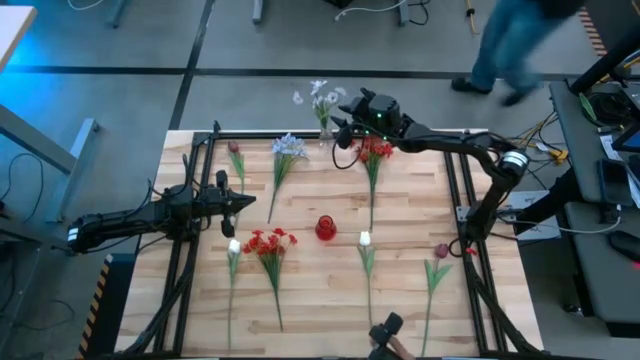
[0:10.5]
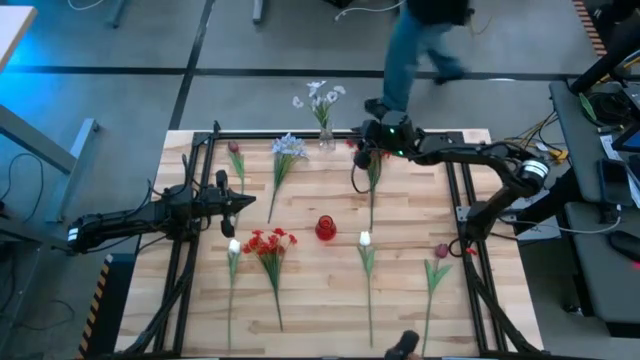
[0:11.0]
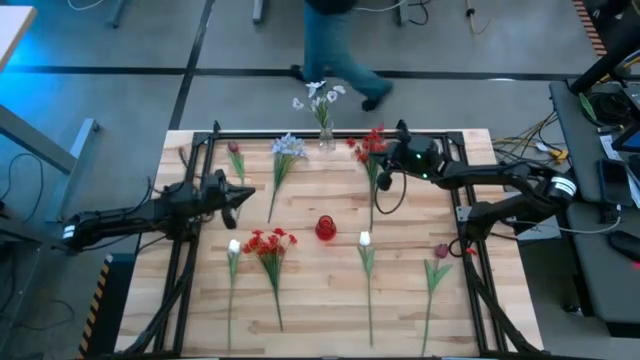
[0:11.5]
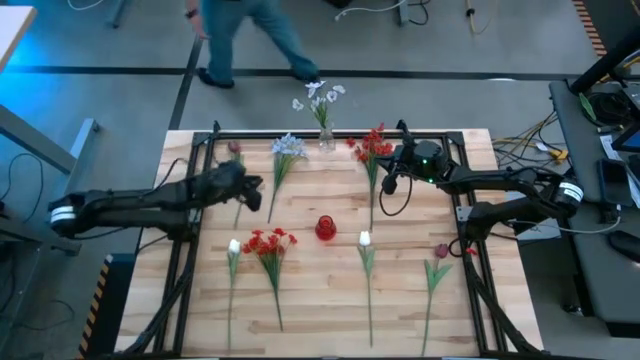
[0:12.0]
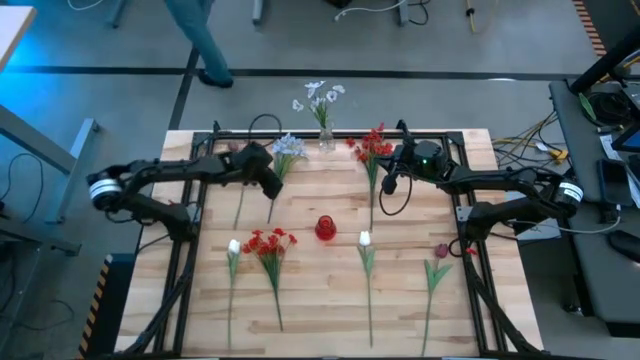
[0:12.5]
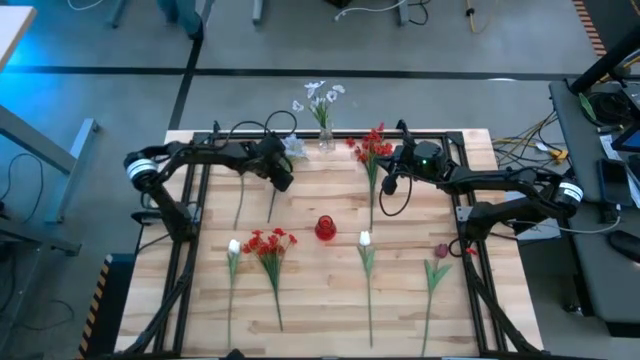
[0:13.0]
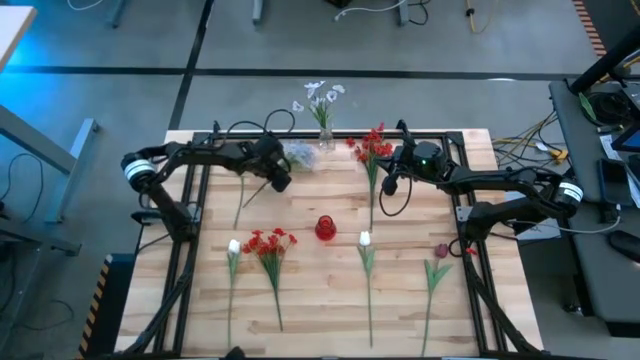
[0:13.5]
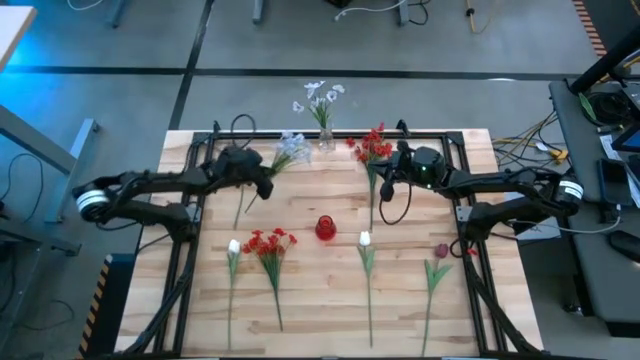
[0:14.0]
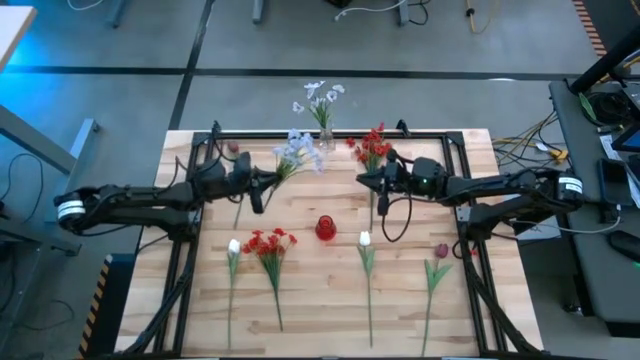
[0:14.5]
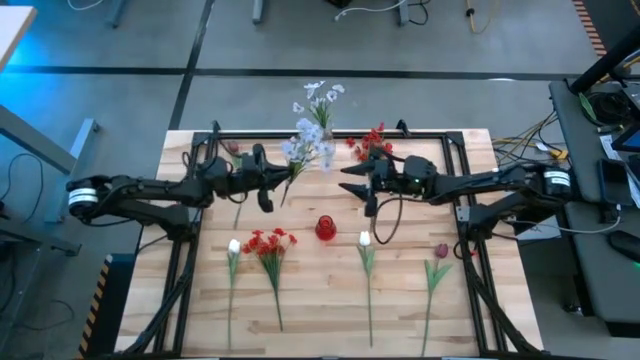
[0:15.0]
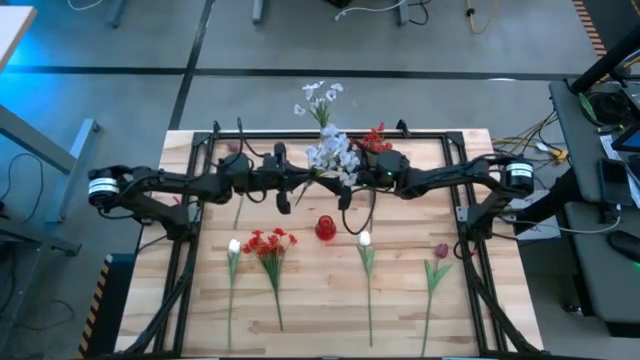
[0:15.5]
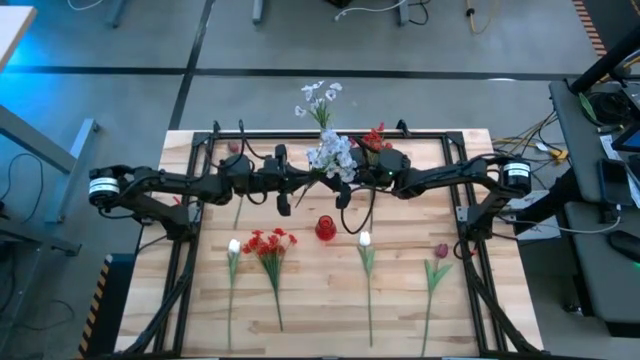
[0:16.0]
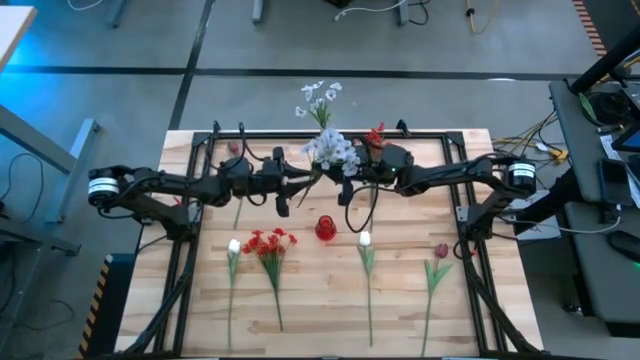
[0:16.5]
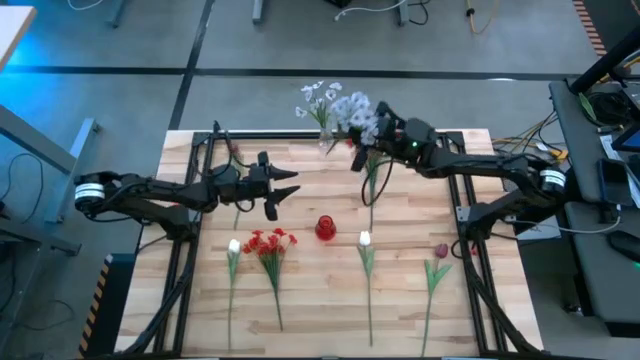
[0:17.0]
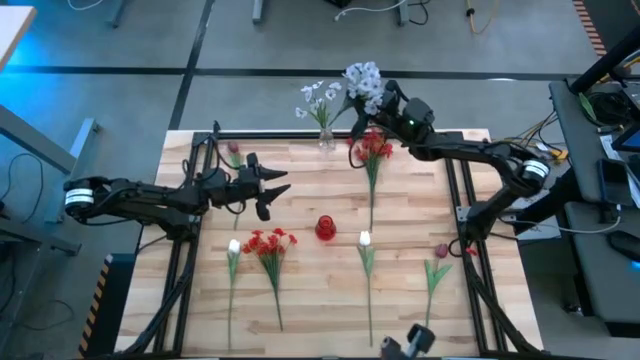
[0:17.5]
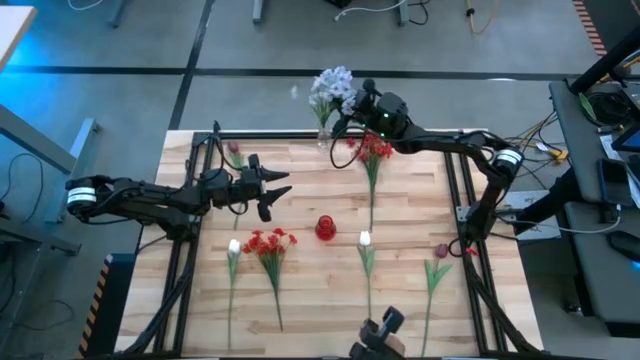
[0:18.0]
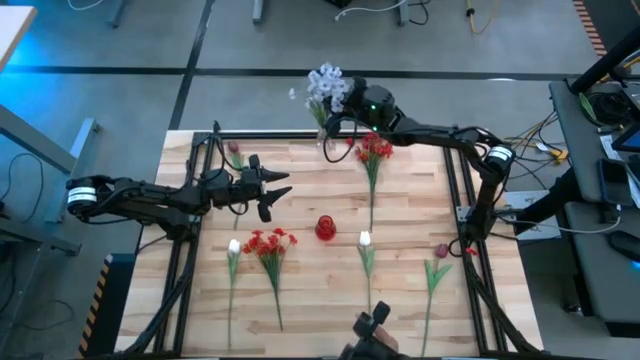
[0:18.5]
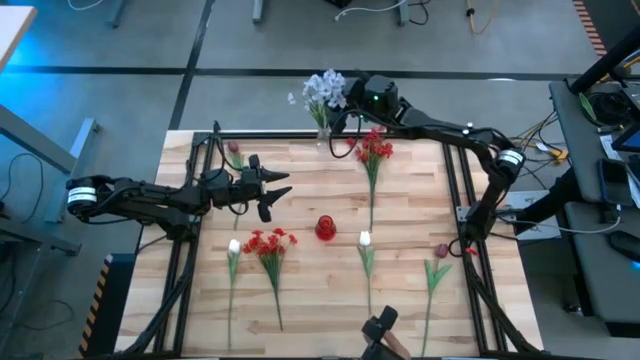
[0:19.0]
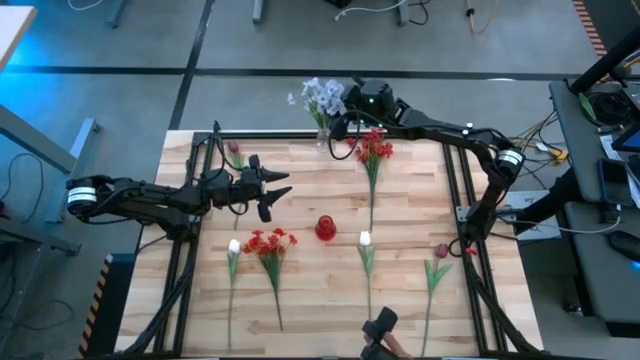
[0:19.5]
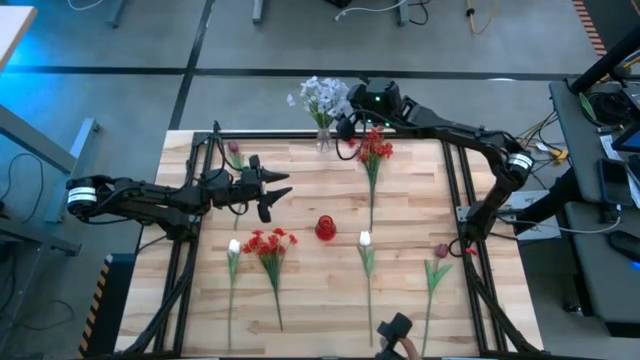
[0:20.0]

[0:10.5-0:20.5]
Task: Sort flowers into vase by color
Put the white flowers into the transparent flower vase

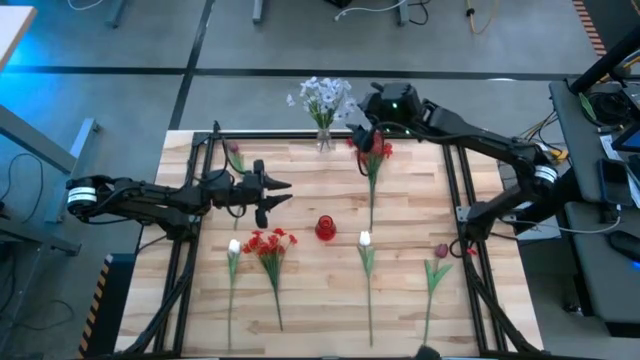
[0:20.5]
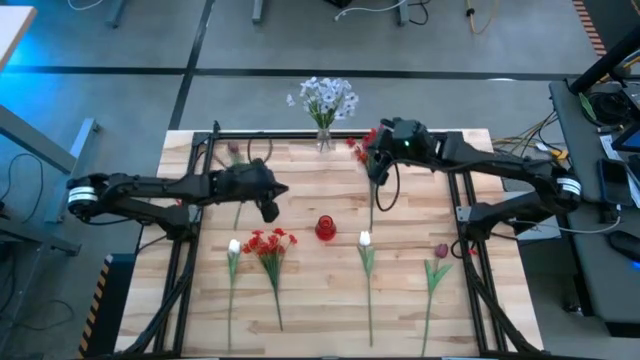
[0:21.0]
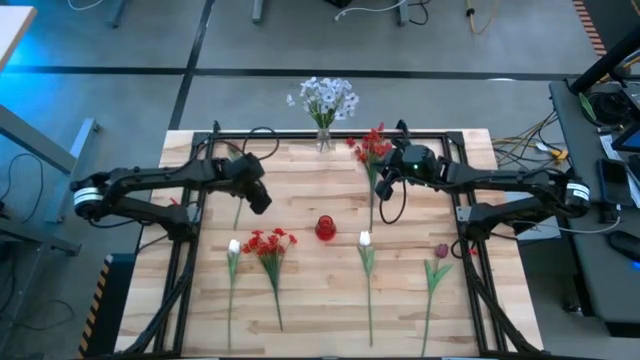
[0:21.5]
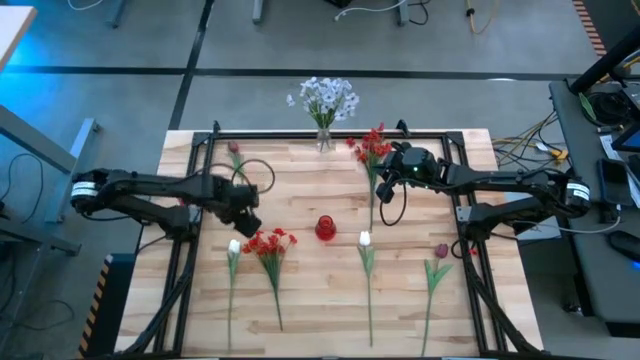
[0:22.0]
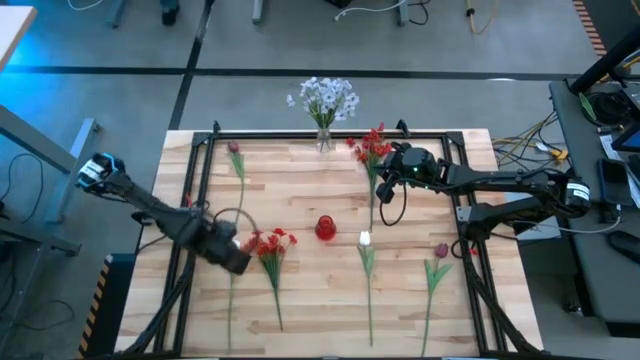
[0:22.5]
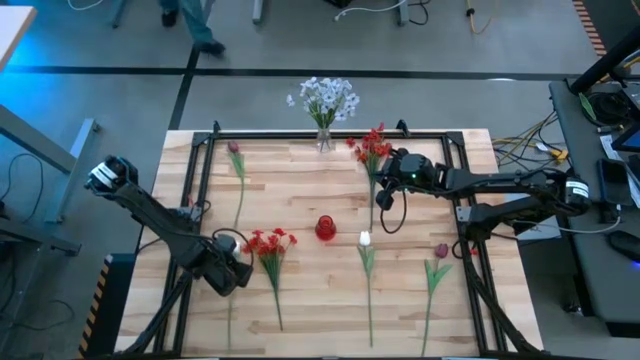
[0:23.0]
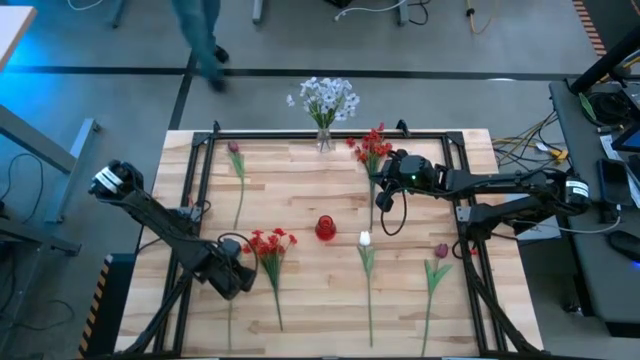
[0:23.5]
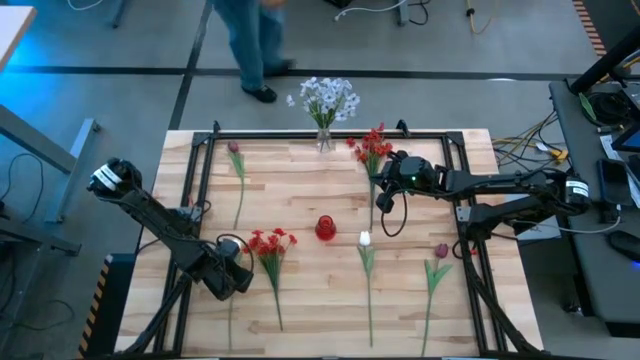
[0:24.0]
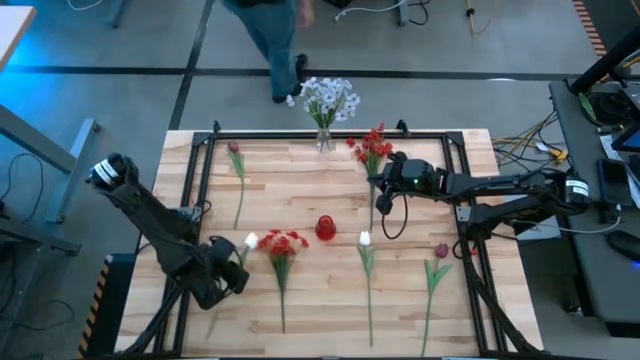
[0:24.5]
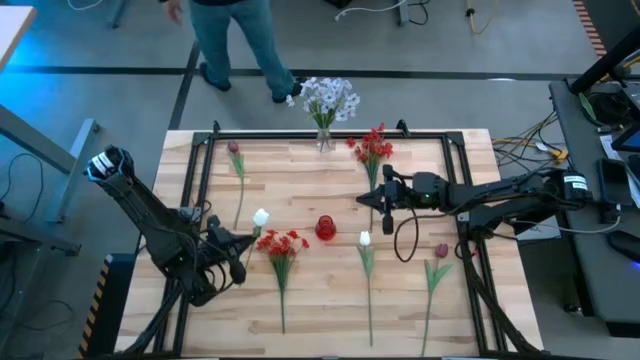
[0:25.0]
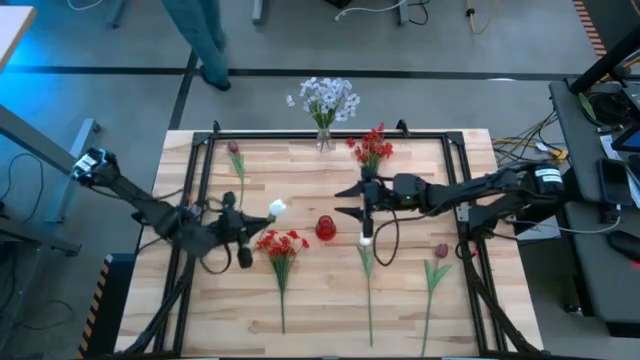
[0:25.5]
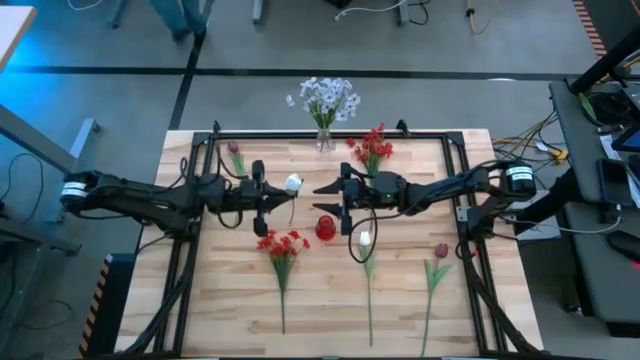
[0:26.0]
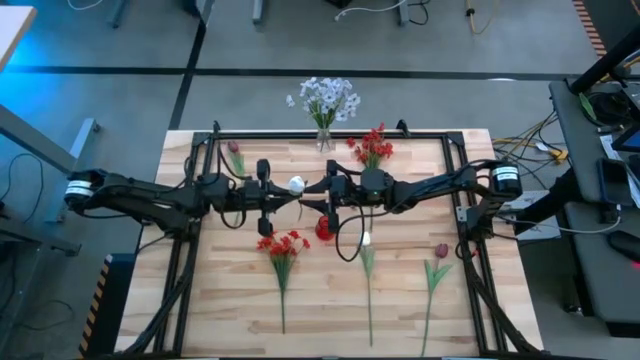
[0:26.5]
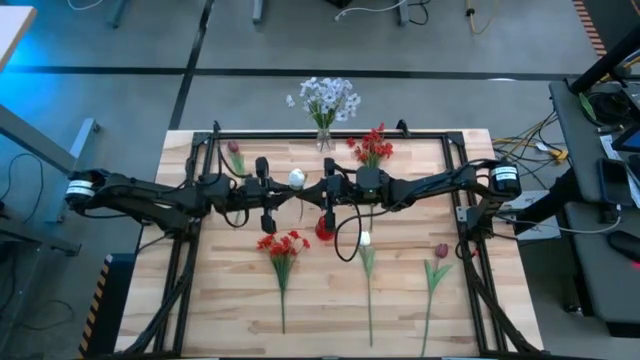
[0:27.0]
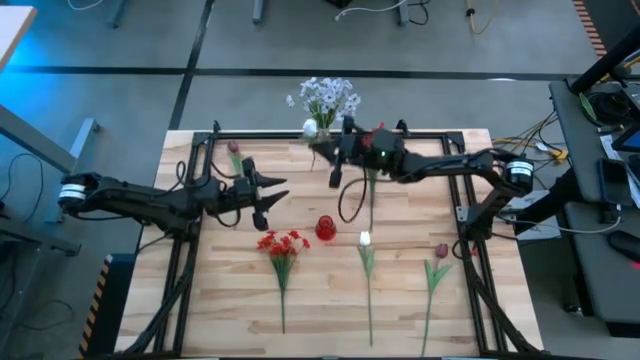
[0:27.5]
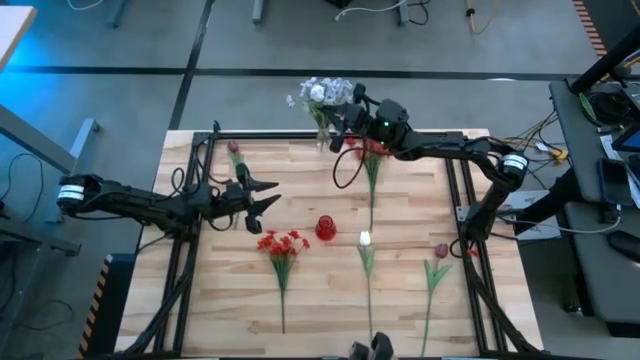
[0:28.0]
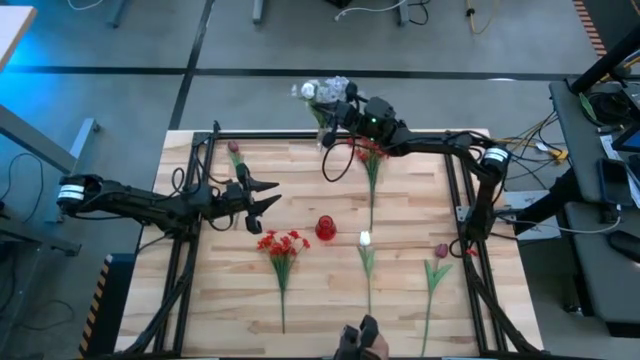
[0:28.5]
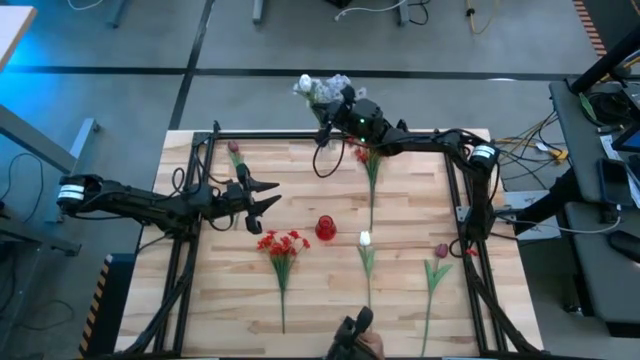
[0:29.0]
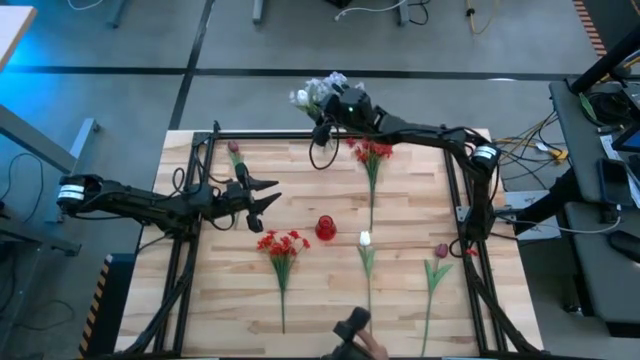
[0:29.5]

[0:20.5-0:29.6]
Put the left white tulip flower into the transparent vase
